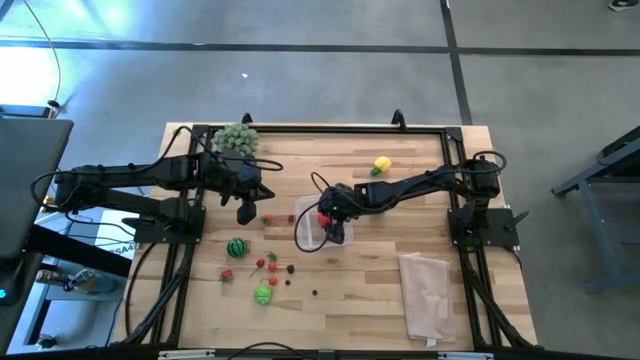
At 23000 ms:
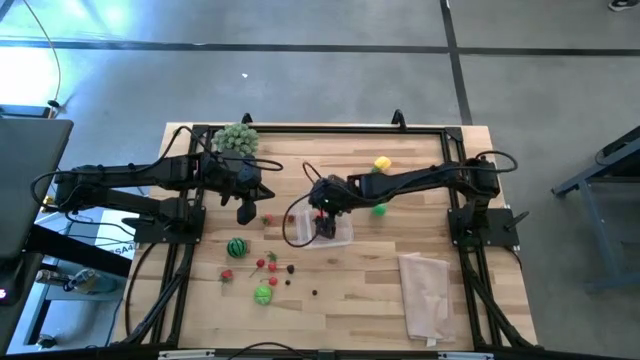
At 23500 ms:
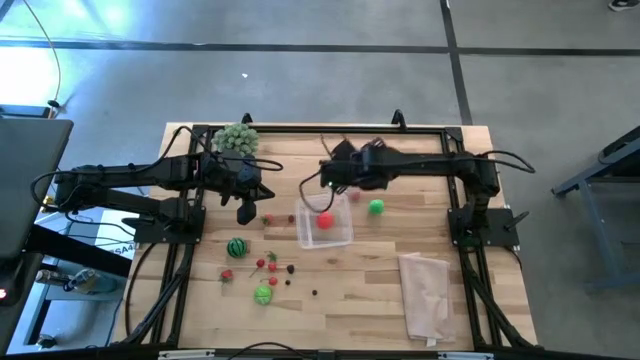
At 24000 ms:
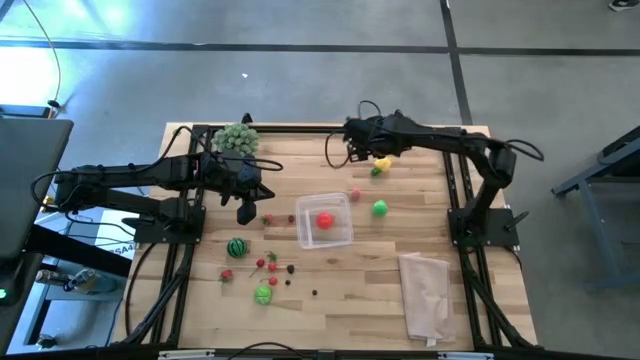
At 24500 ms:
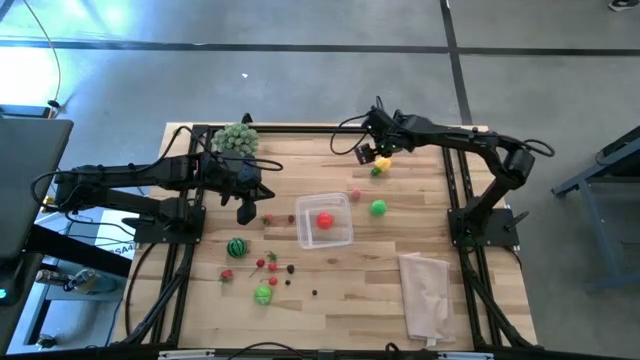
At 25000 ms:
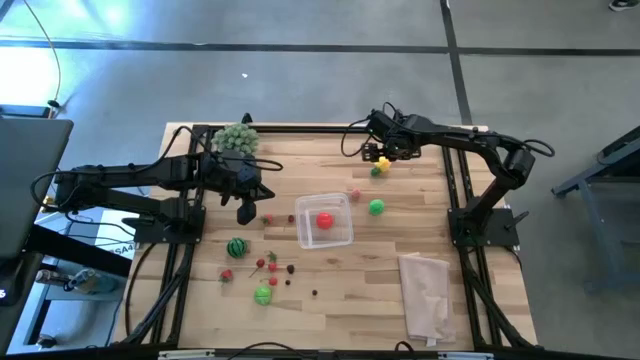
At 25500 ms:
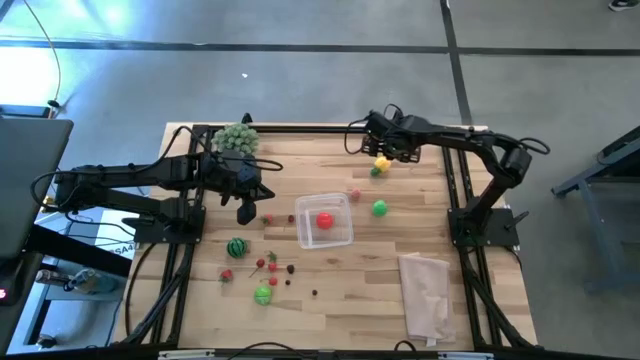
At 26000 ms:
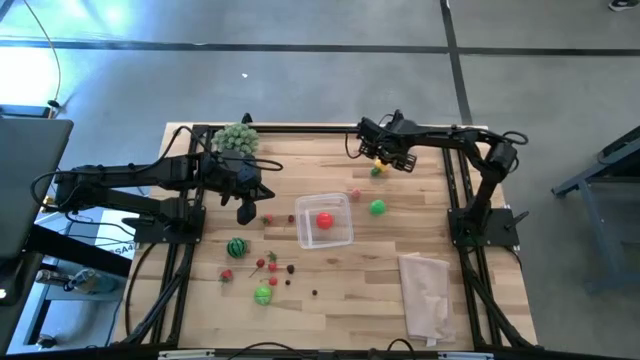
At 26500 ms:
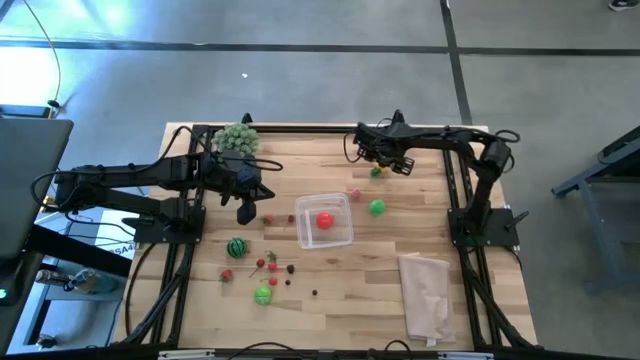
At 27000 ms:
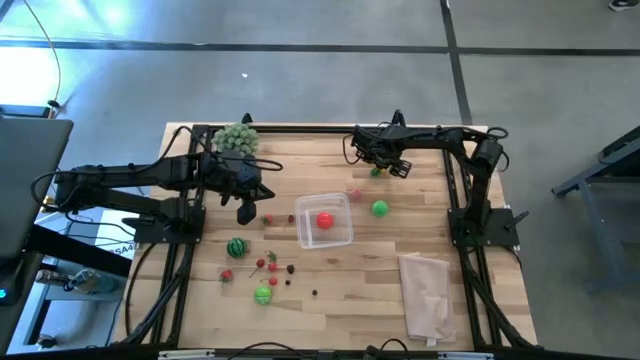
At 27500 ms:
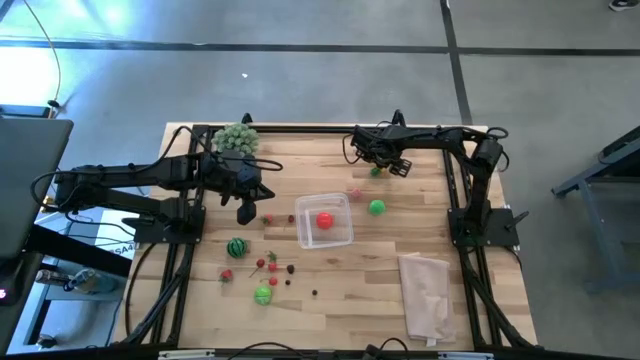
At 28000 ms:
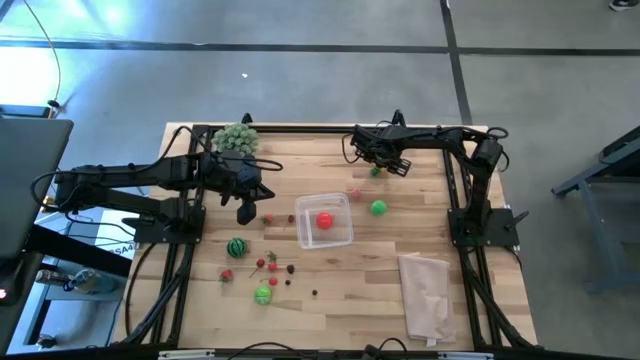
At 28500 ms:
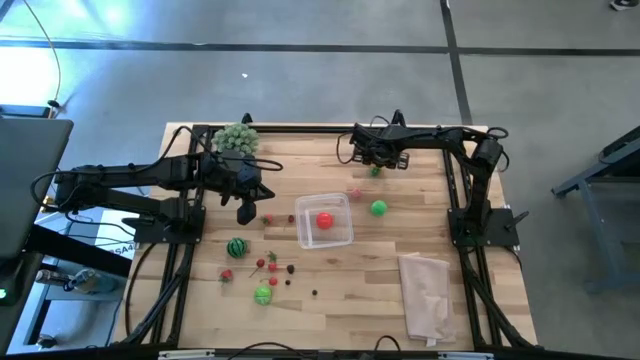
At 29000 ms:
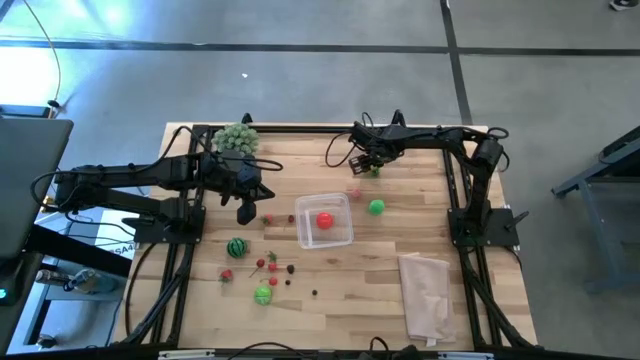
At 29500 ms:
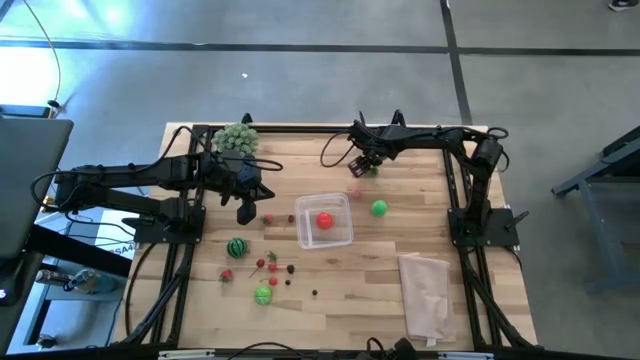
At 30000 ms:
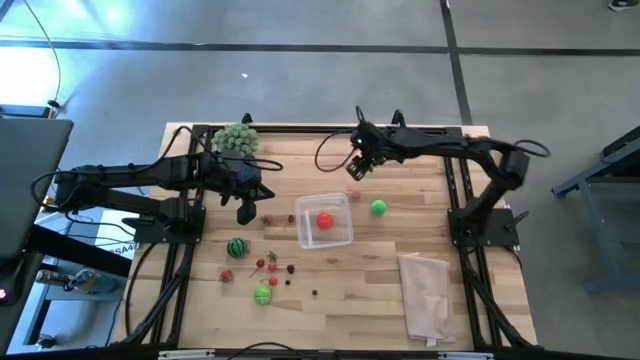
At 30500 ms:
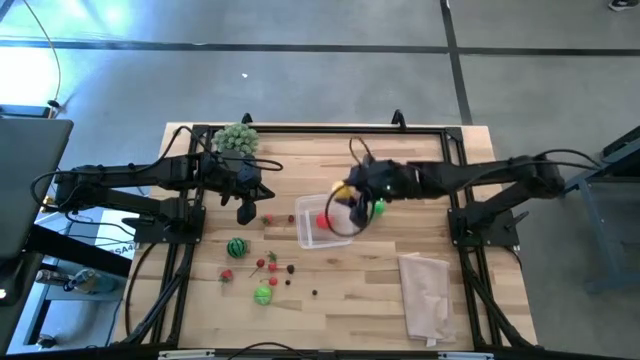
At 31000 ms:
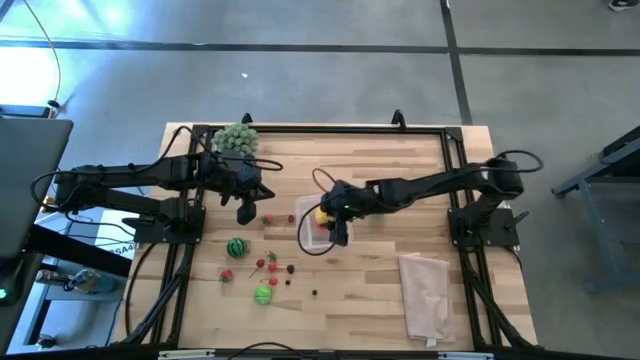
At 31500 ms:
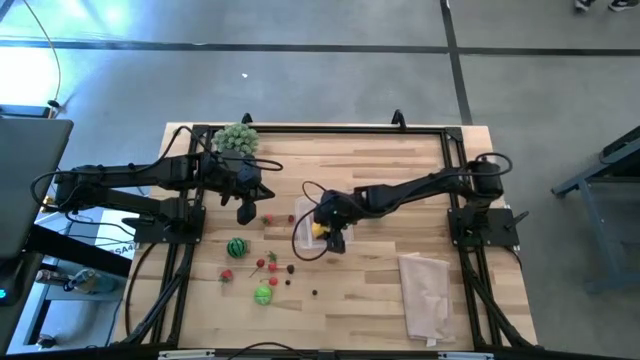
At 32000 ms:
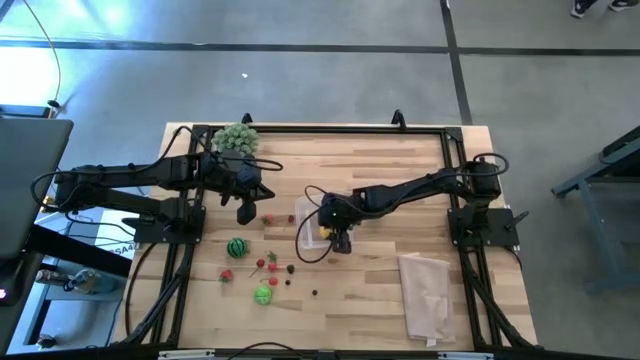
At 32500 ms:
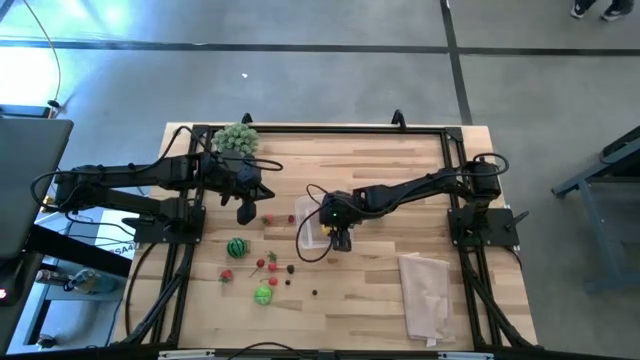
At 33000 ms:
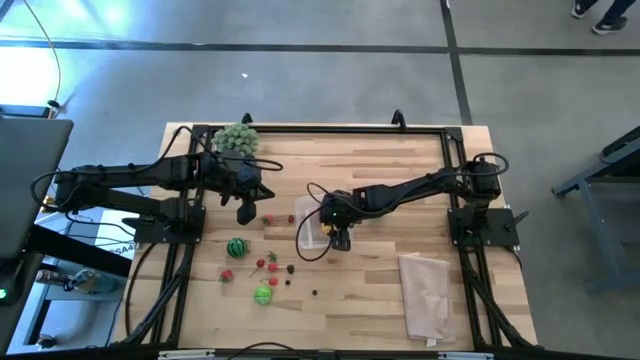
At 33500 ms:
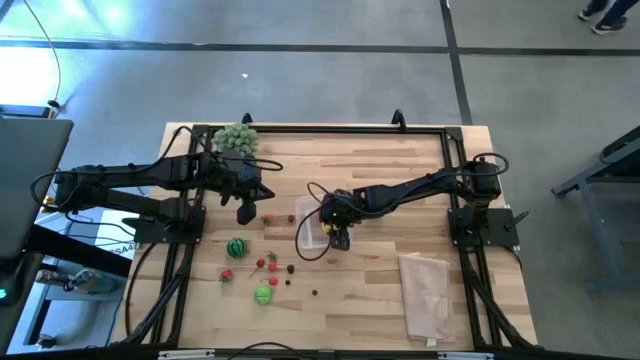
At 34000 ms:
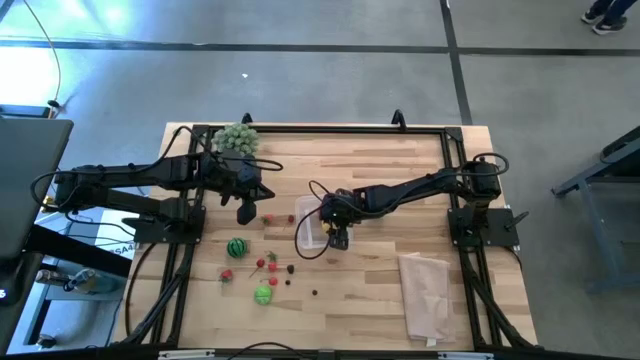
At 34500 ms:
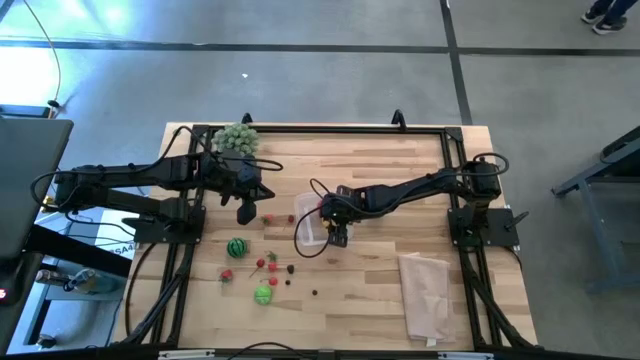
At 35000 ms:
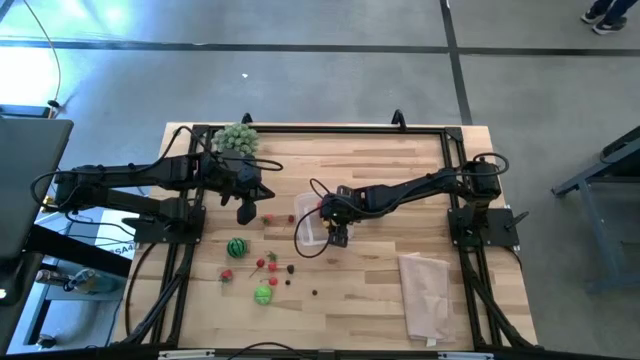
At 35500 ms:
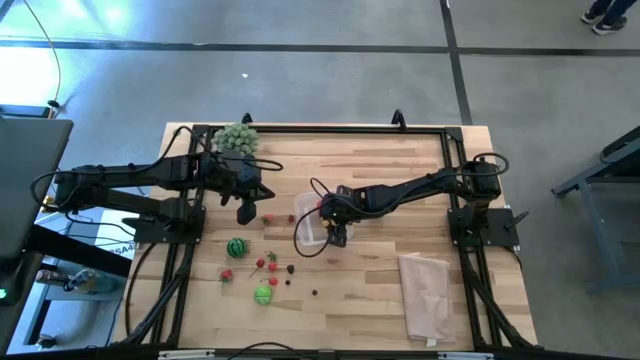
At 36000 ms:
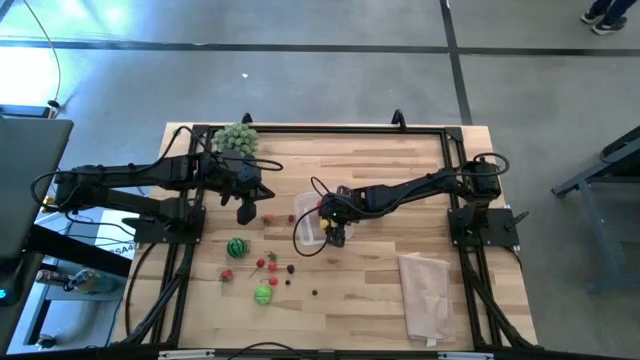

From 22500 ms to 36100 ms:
Task: Pick and placing Produce into tupperware
Put the yellow pineapple into the transparent bin

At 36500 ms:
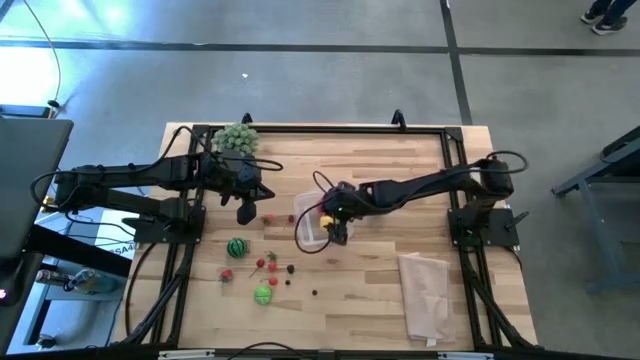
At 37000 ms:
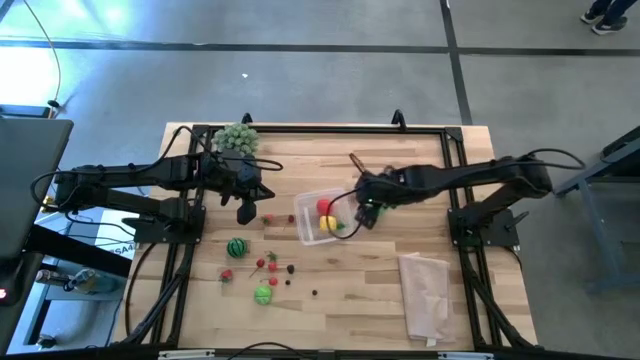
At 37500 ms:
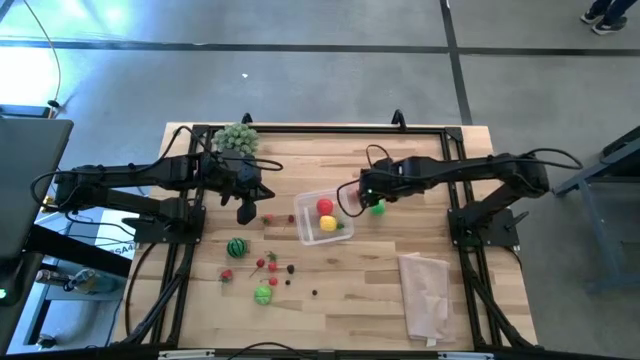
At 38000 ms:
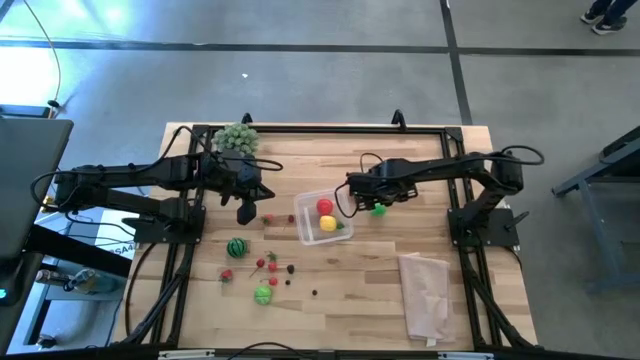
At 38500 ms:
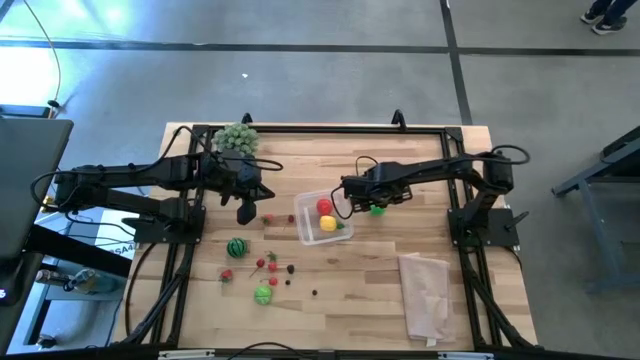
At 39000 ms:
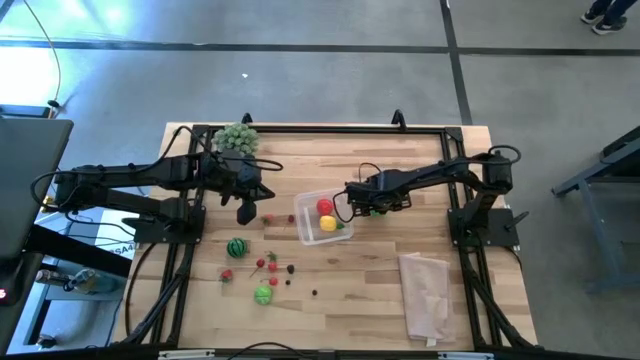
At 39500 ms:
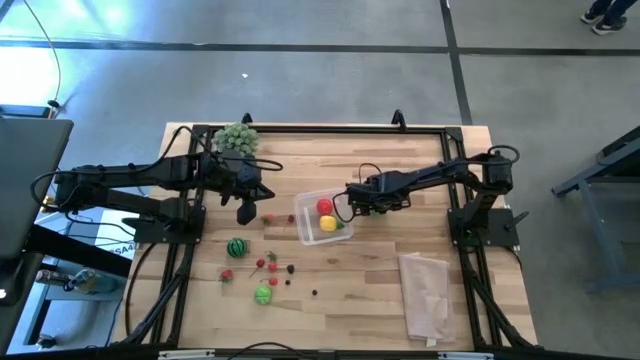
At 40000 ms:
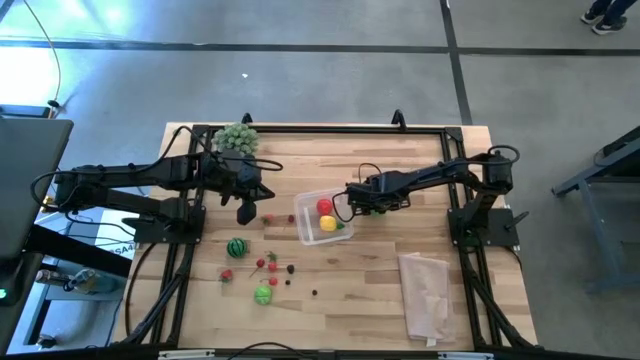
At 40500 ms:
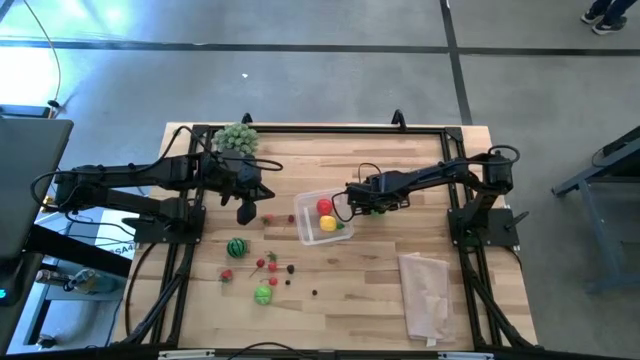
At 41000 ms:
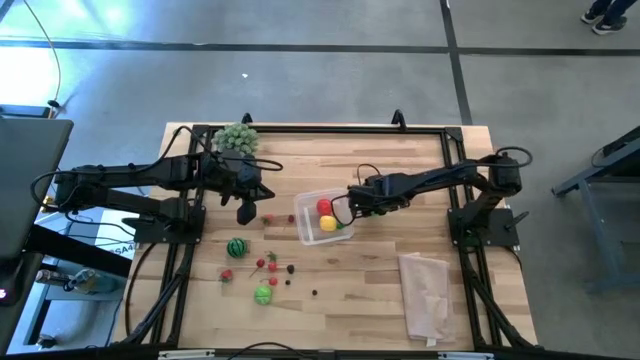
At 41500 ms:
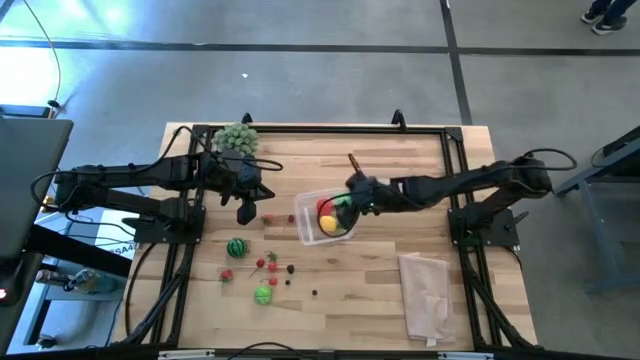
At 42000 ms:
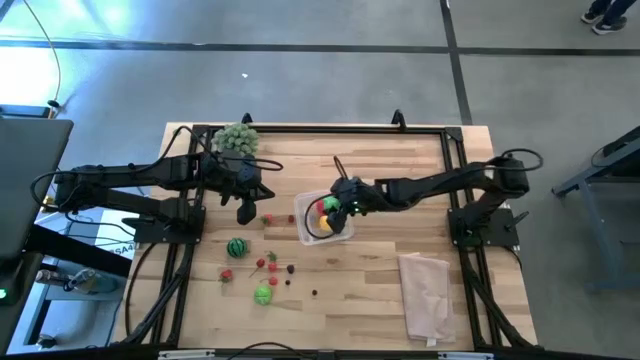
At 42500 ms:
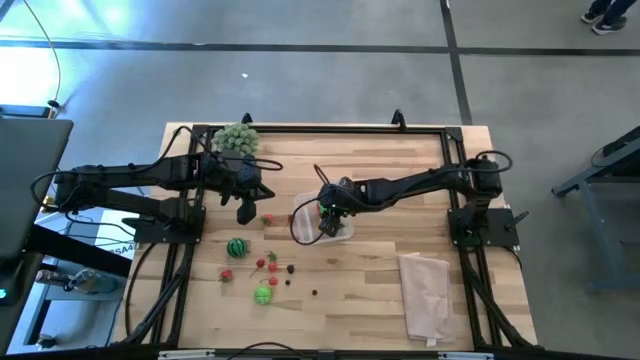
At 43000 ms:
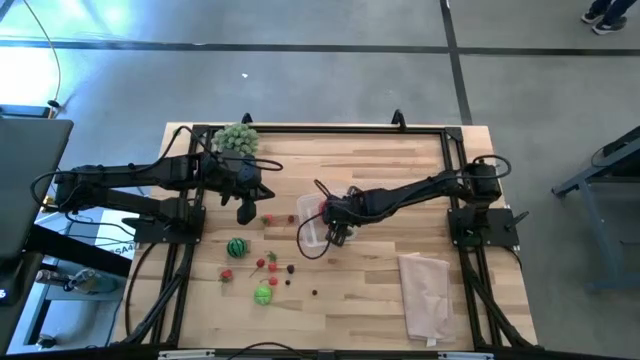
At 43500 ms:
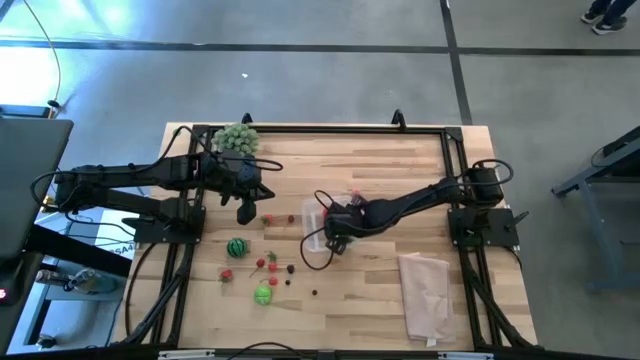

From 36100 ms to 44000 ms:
Put the green pear into the transparent bin
